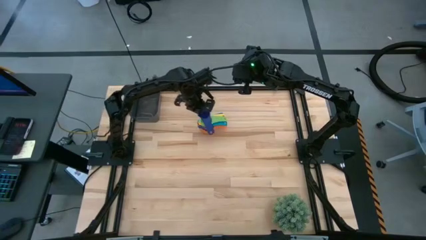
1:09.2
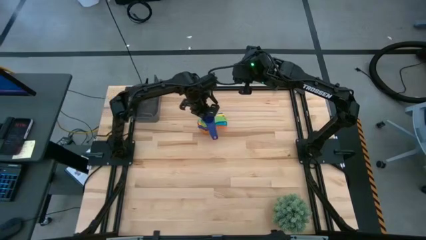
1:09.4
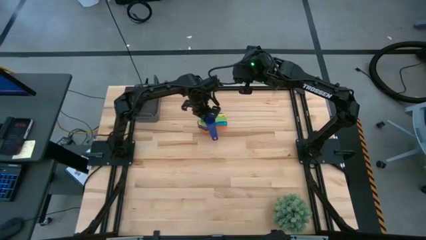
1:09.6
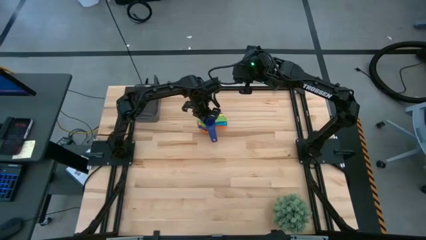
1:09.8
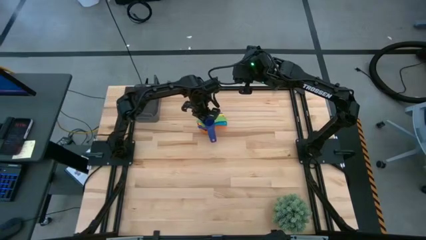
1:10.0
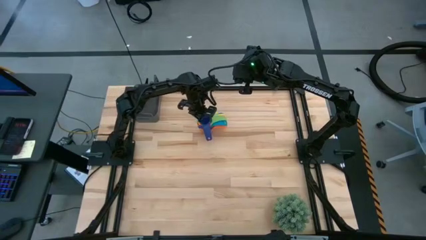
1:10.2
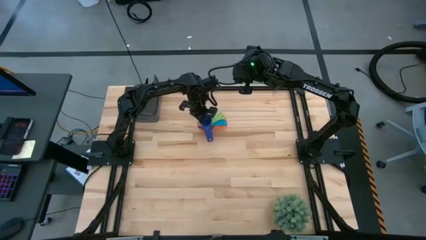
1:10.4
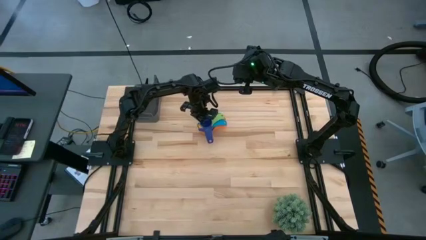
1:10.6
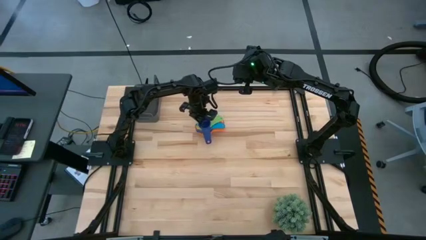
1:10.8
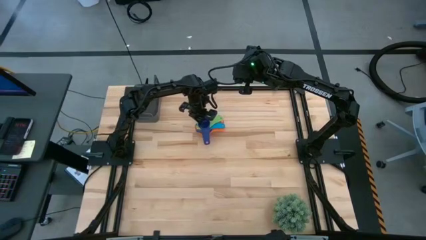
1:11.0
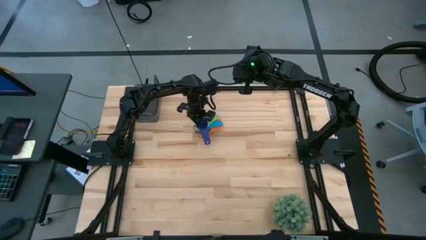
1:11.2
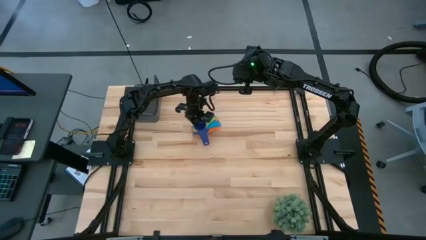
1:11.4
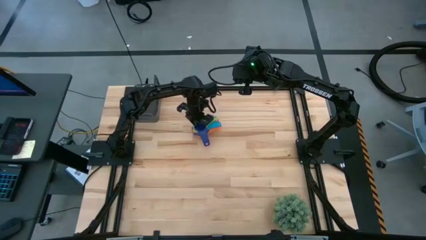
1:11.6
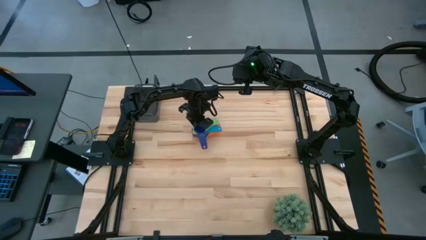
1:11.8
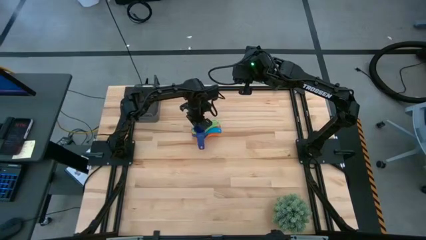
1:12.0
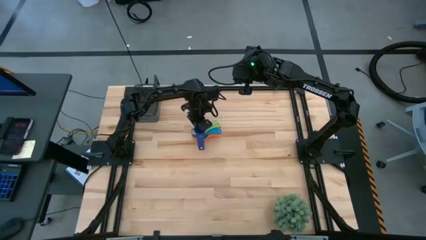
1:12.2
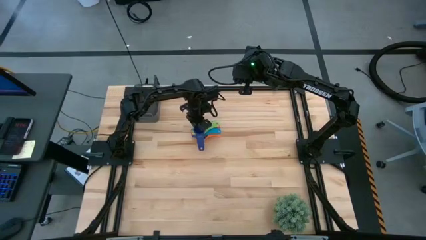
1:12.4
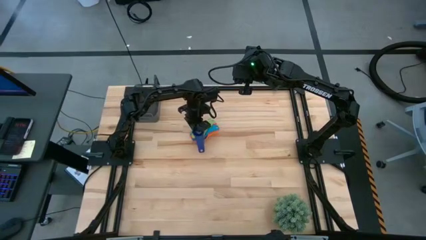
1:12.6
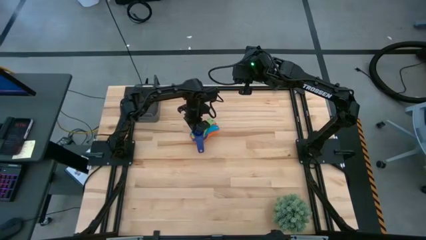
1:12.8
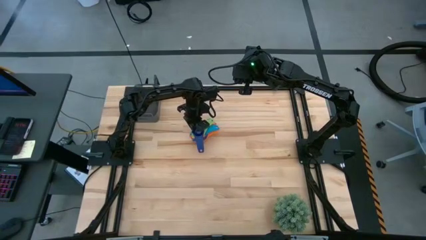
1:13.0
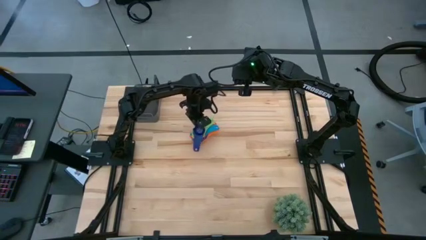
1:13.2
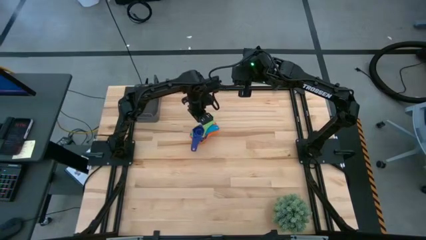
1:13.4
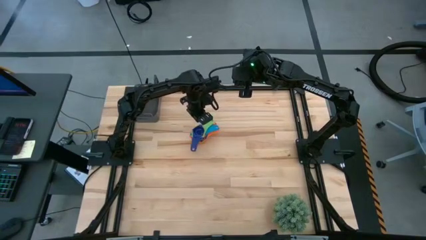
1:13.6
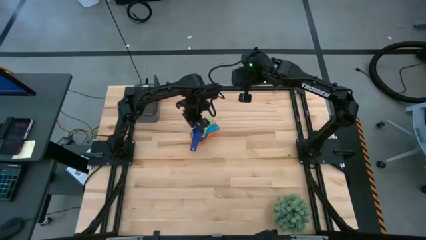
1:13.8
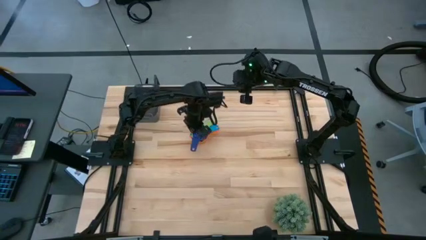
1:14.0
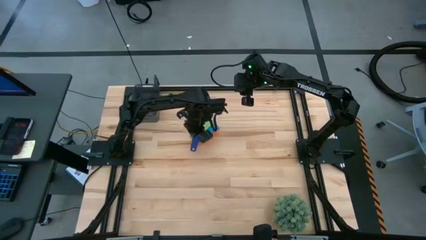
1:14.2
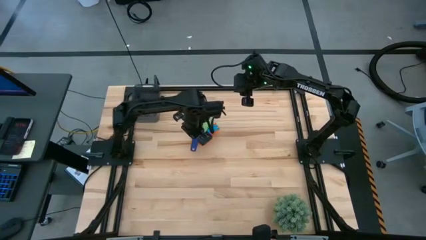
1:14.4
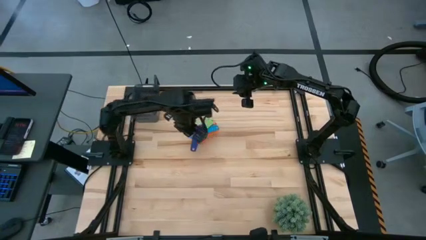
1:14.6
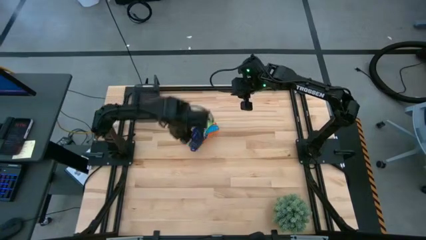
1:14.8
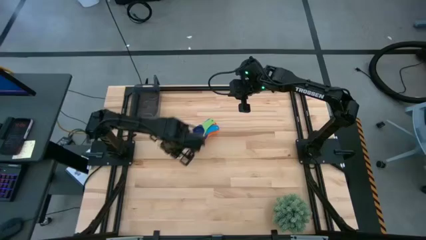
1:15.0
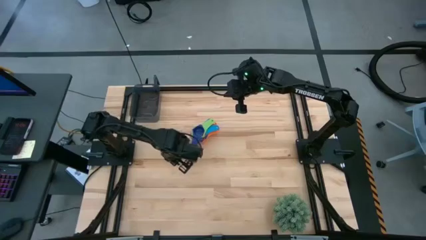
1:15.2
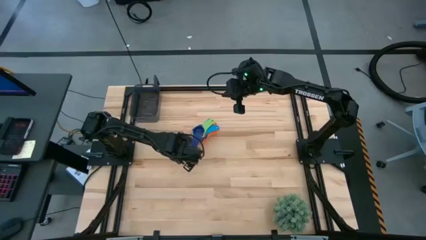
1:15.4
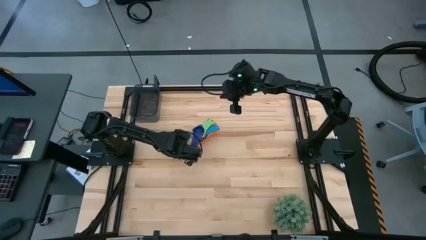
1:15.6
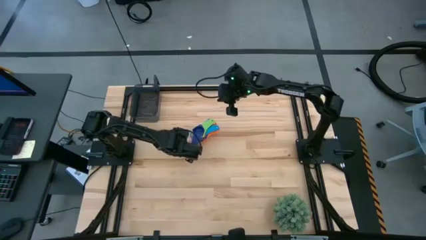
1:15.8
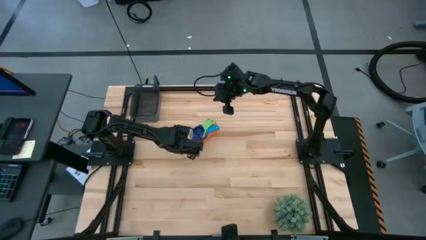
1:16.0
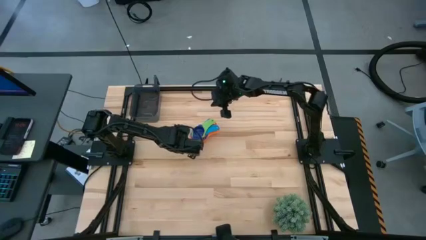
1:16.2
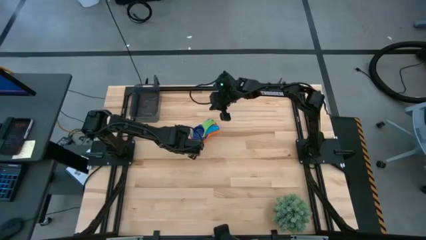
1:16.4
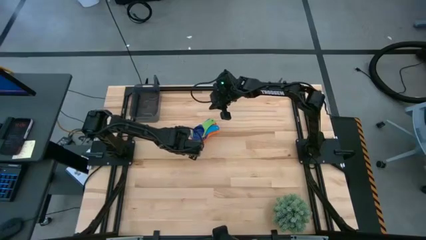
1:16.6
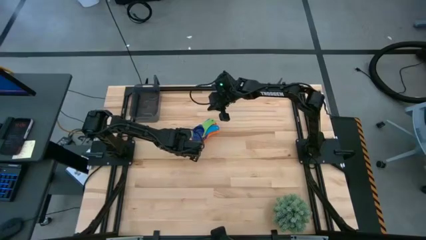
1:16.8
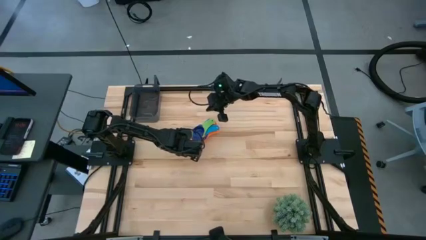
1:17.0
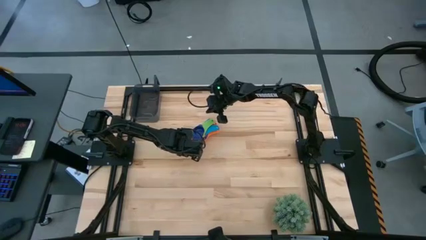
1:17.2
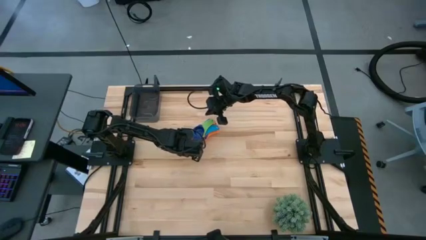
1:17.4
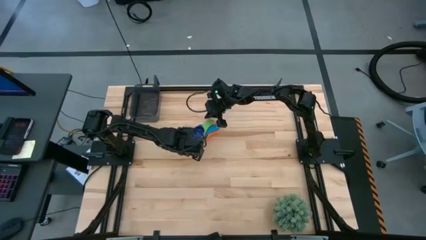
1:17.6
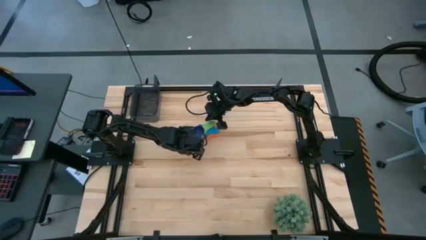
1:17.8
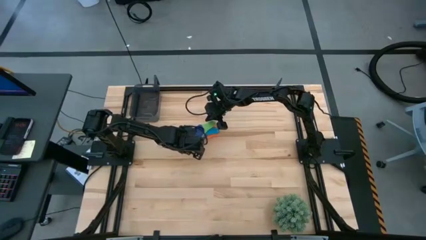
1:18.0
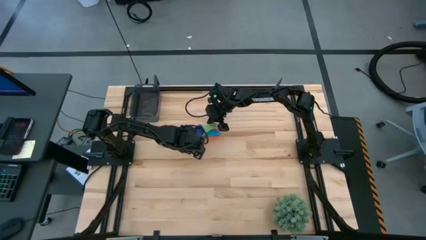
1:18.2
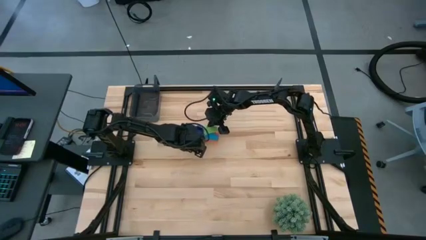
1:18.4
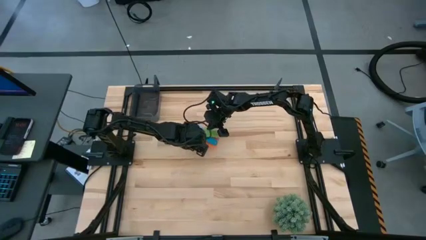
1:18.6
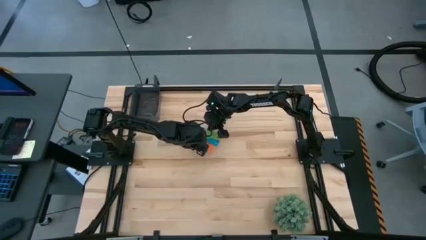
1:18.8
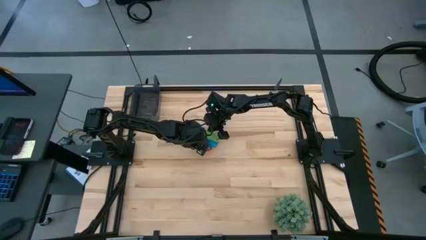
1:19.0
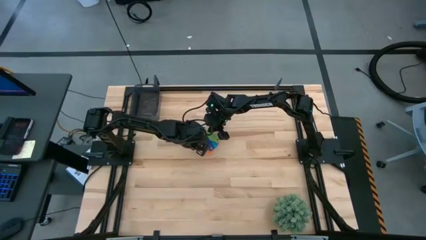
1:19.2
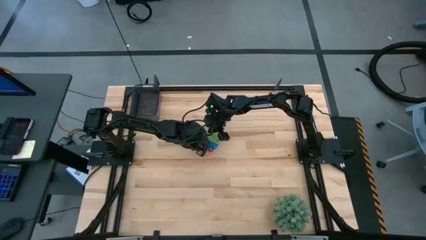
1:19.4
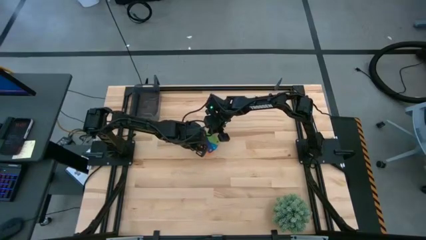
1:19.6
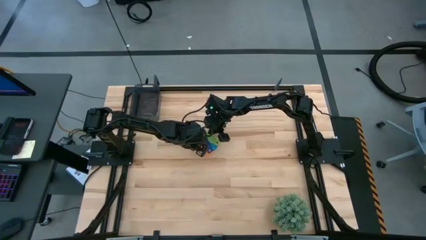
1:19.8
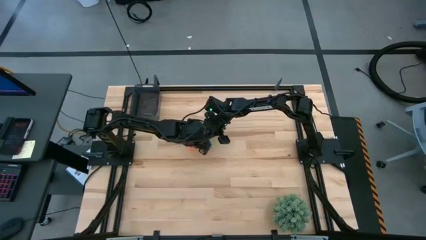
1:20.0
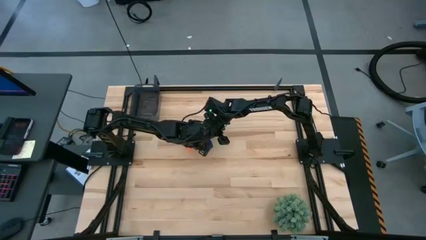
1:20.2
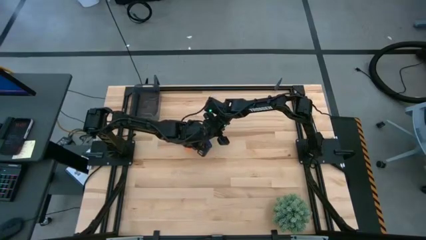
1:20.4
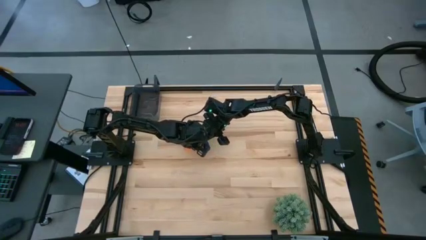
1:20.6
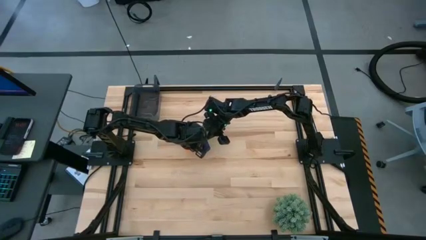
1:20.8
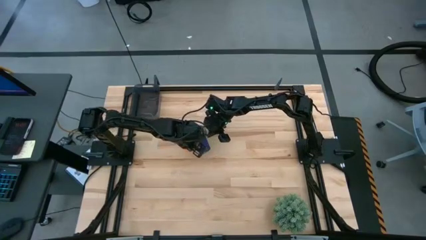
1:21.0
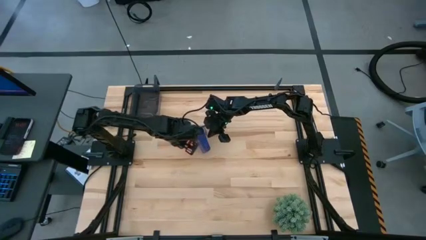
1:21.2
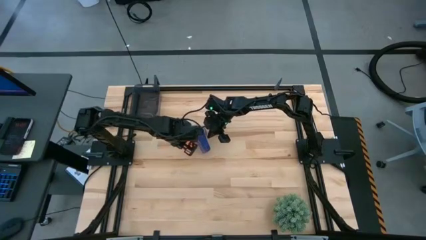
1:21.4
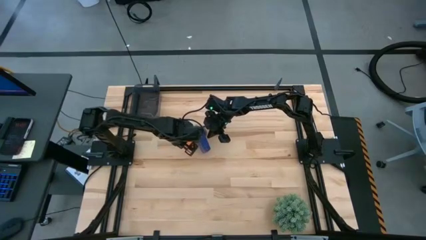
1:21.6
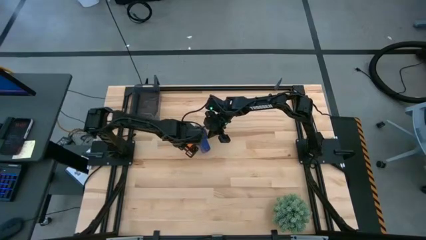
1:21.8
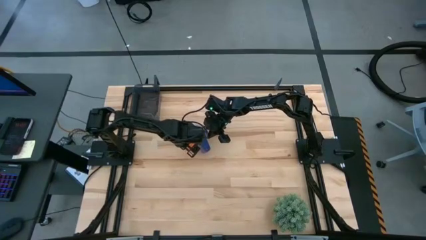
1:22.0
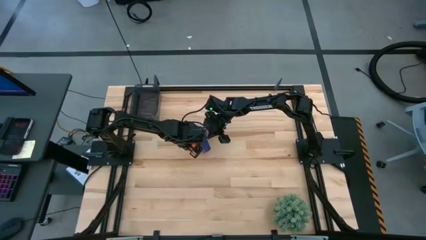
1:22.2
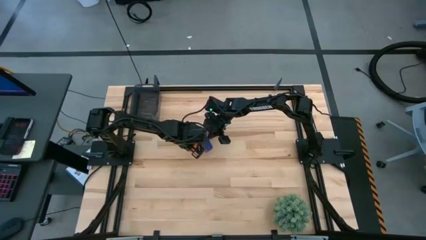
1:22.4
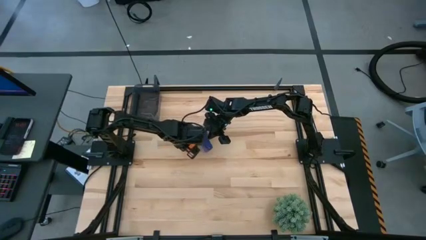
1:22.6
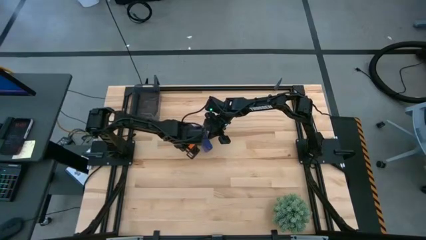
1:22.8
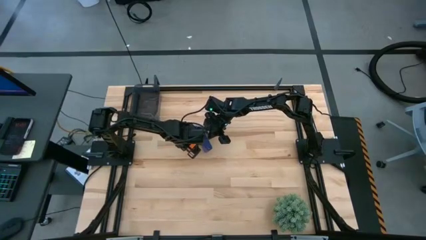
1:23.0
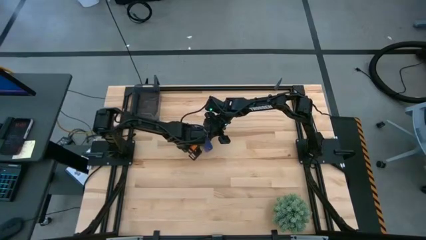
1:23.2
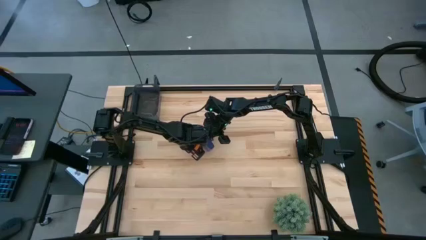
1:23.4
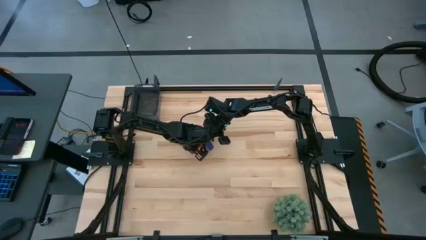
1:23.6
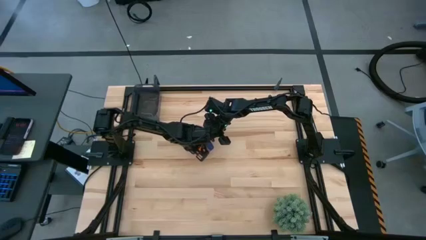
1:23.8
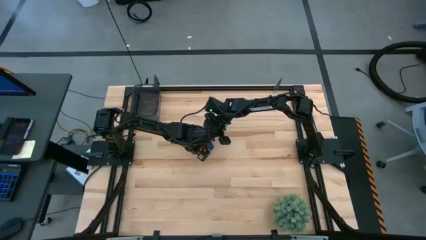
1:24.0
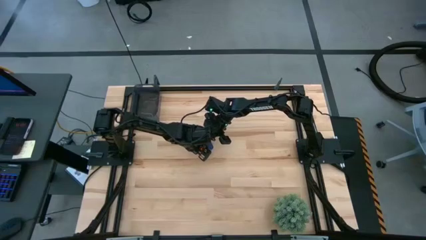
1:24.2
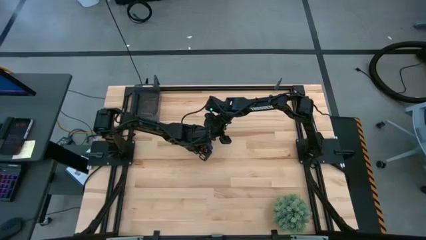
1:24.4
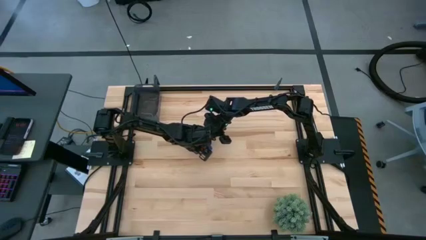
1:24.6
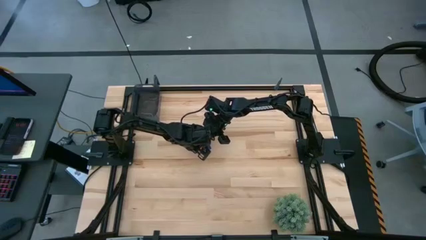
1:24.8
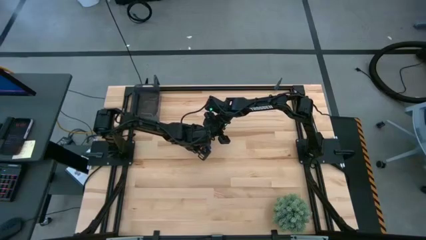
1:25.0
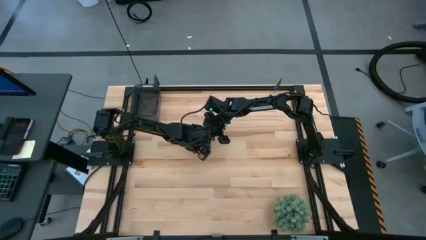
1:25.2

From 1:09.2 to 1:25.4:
Task: Nest measuring cups in basket
Stack the violet measuring cup on top of the green measuring cup
